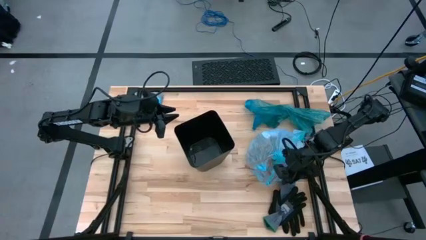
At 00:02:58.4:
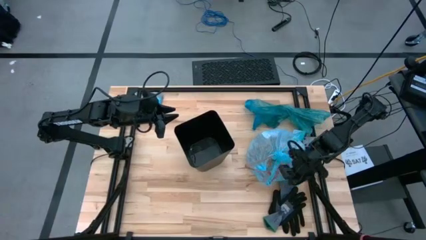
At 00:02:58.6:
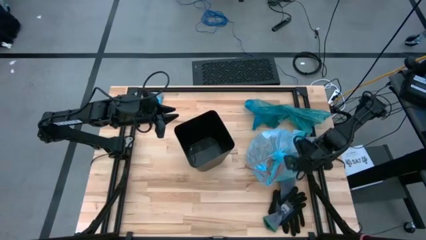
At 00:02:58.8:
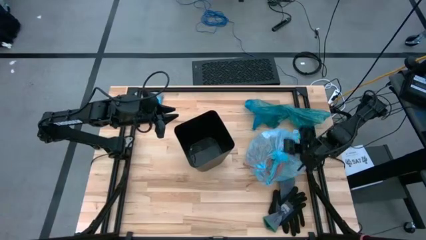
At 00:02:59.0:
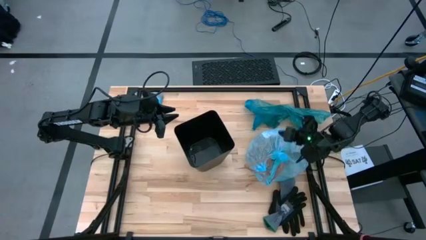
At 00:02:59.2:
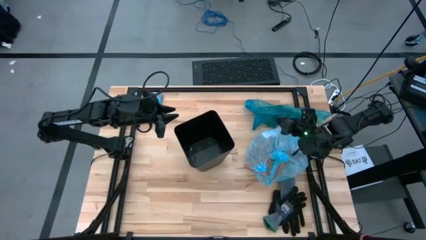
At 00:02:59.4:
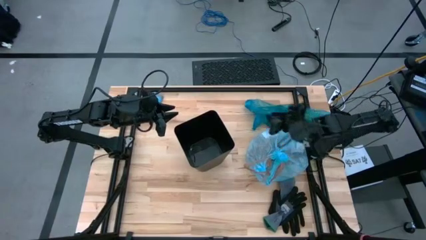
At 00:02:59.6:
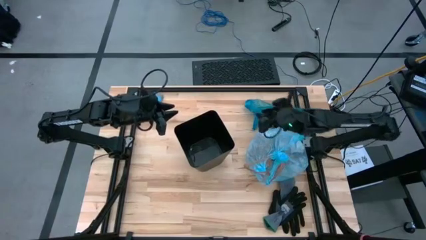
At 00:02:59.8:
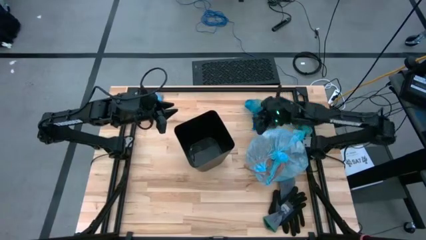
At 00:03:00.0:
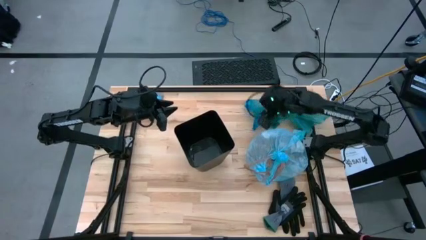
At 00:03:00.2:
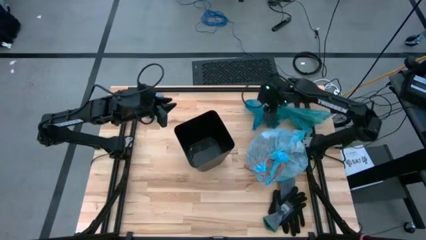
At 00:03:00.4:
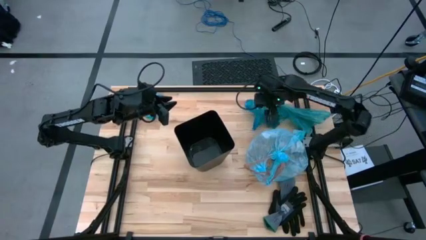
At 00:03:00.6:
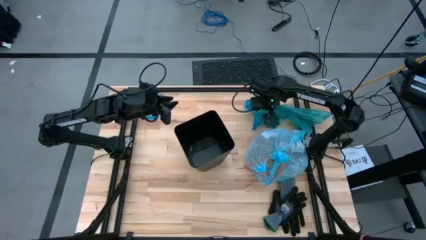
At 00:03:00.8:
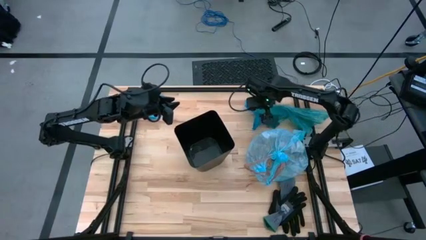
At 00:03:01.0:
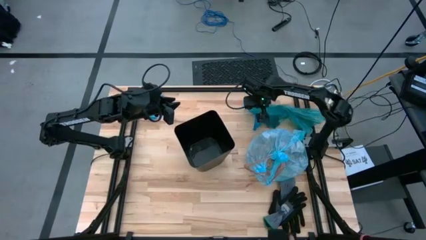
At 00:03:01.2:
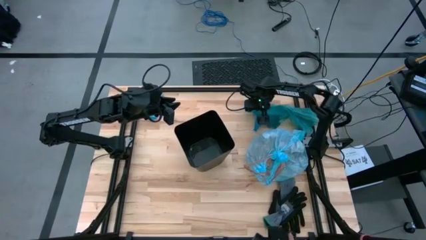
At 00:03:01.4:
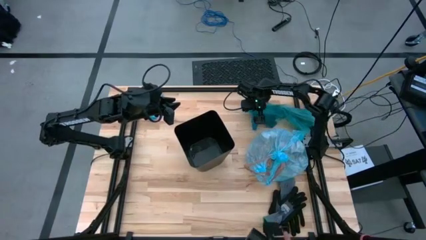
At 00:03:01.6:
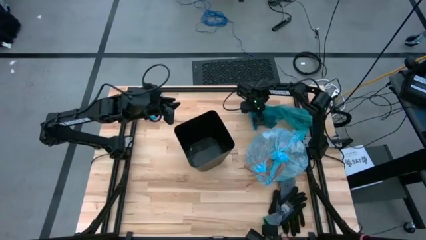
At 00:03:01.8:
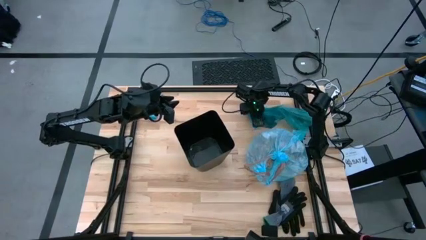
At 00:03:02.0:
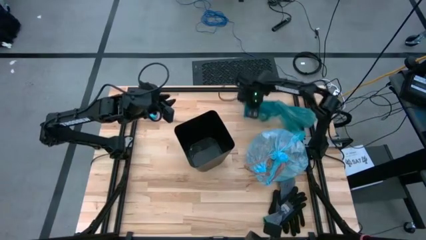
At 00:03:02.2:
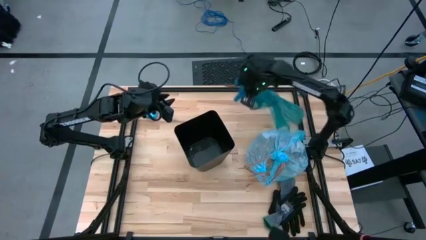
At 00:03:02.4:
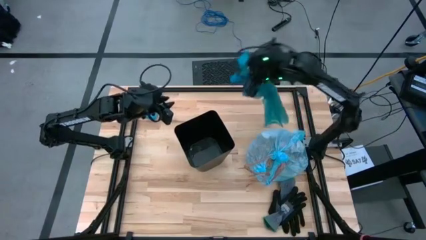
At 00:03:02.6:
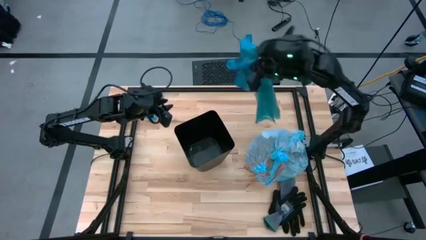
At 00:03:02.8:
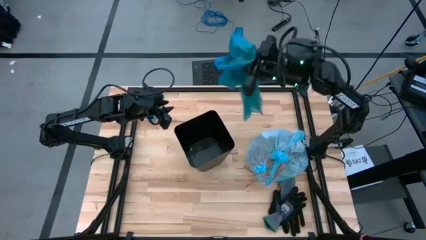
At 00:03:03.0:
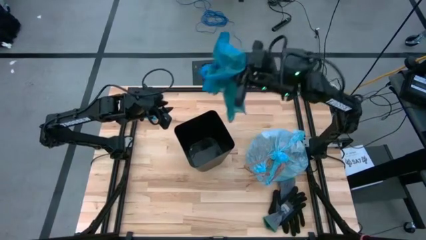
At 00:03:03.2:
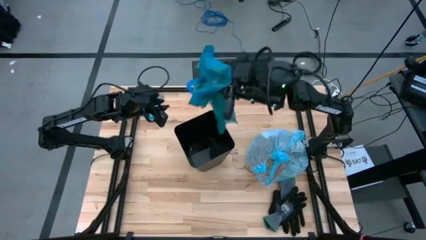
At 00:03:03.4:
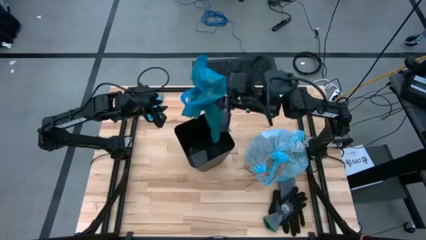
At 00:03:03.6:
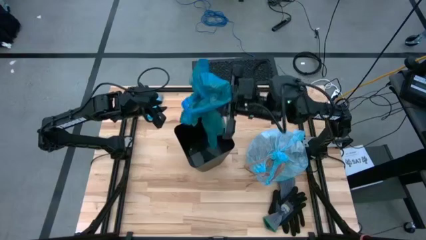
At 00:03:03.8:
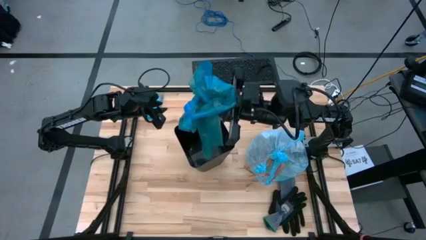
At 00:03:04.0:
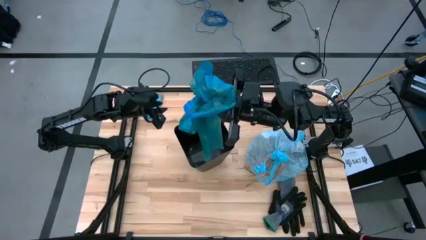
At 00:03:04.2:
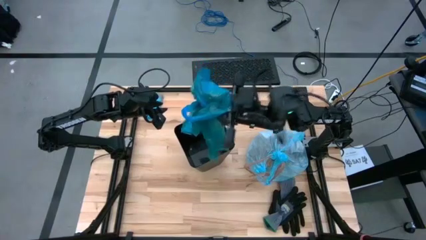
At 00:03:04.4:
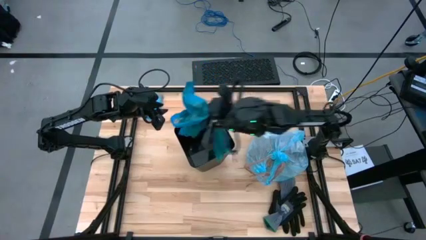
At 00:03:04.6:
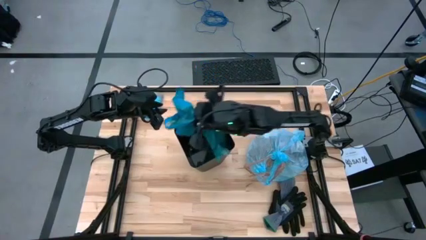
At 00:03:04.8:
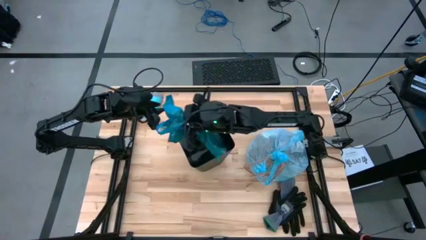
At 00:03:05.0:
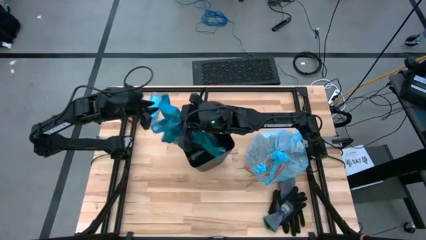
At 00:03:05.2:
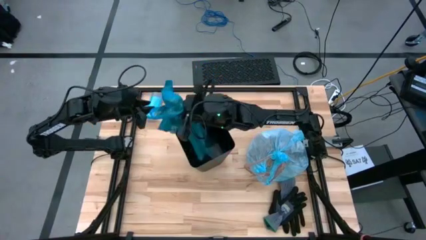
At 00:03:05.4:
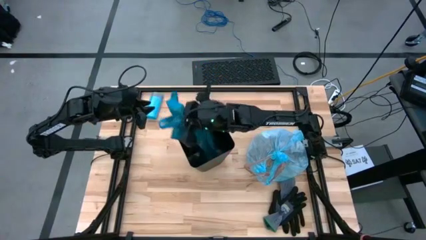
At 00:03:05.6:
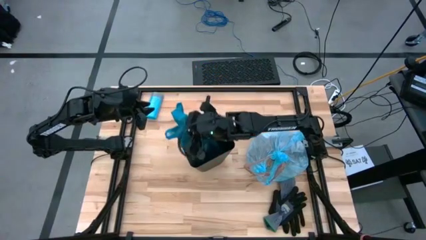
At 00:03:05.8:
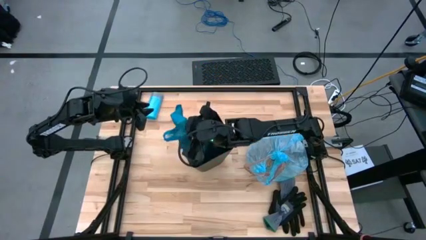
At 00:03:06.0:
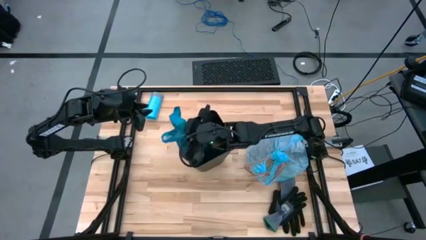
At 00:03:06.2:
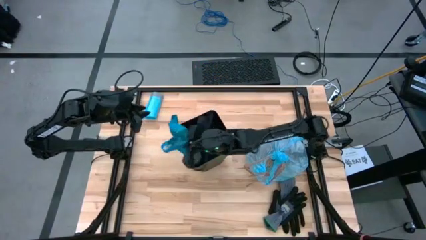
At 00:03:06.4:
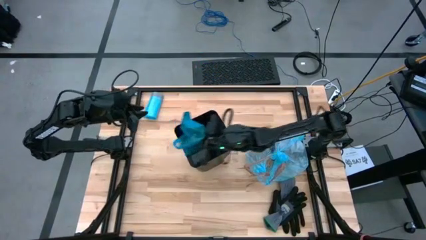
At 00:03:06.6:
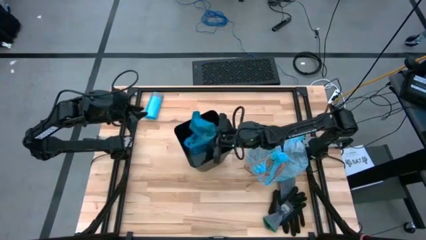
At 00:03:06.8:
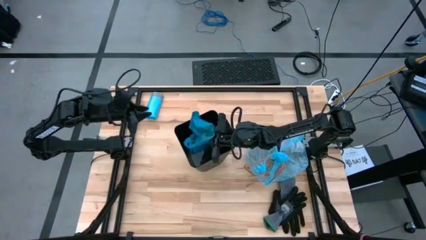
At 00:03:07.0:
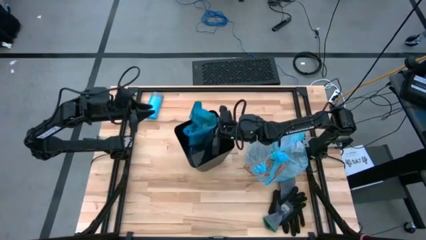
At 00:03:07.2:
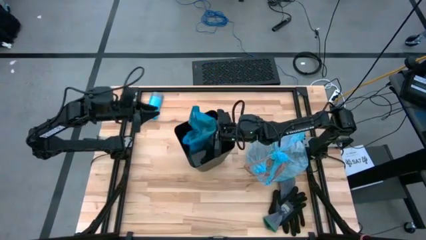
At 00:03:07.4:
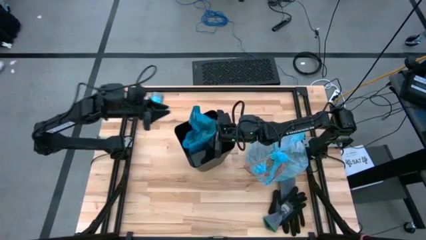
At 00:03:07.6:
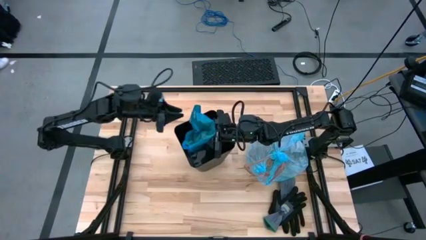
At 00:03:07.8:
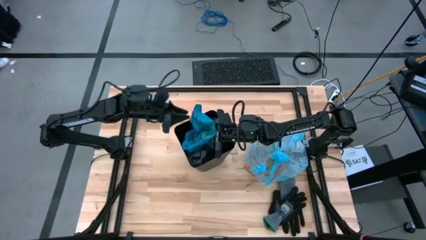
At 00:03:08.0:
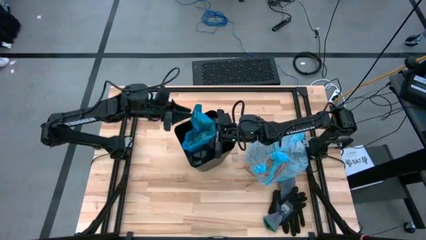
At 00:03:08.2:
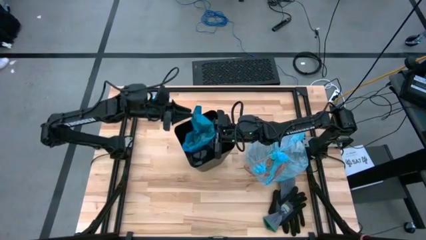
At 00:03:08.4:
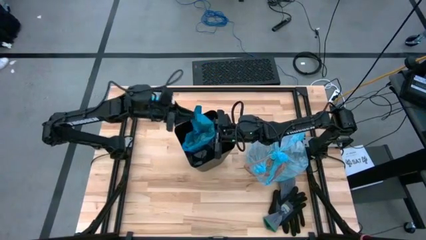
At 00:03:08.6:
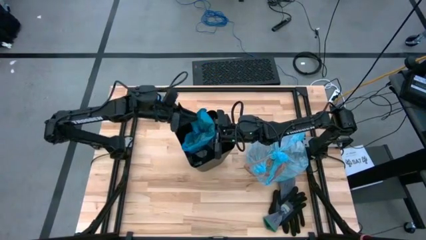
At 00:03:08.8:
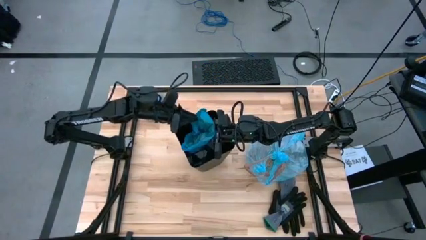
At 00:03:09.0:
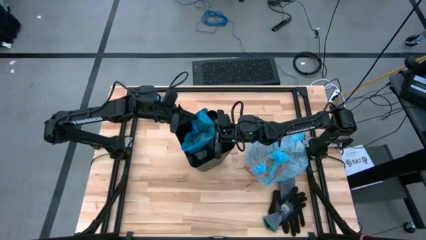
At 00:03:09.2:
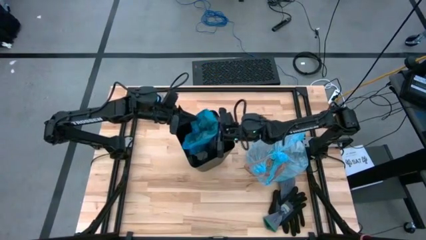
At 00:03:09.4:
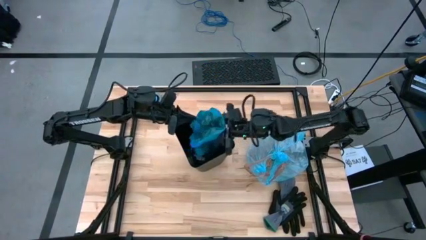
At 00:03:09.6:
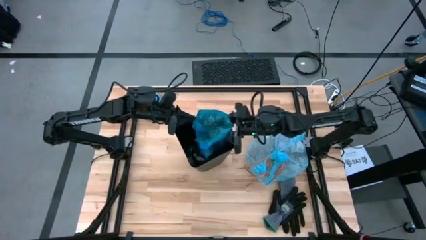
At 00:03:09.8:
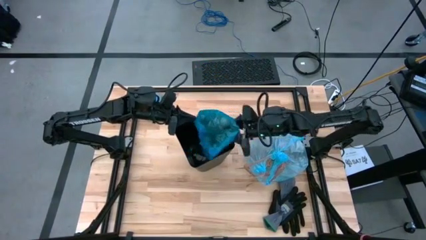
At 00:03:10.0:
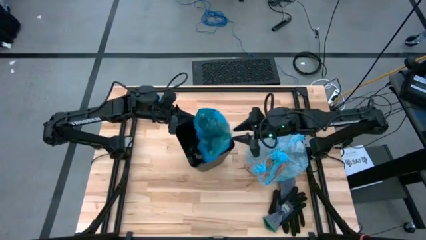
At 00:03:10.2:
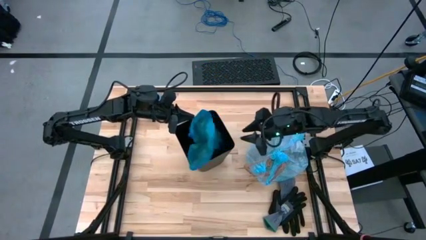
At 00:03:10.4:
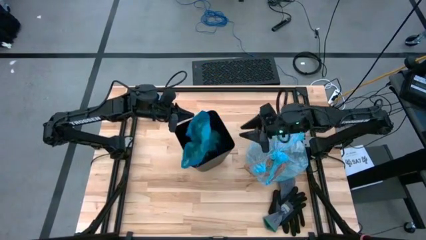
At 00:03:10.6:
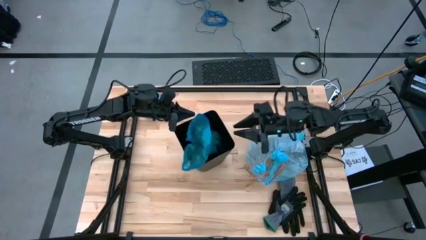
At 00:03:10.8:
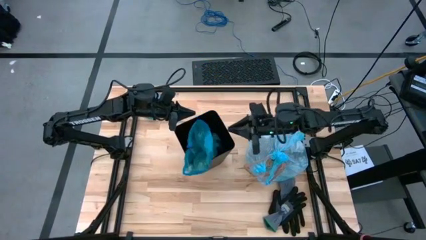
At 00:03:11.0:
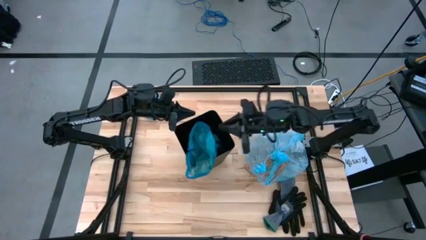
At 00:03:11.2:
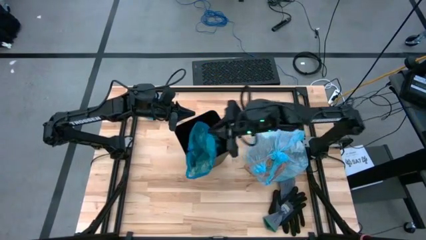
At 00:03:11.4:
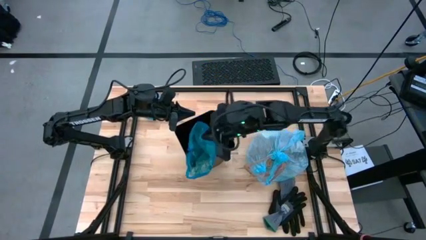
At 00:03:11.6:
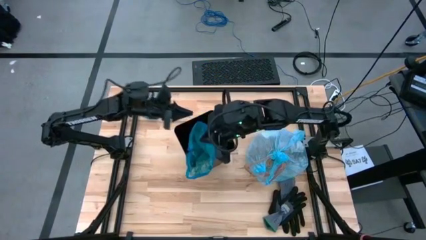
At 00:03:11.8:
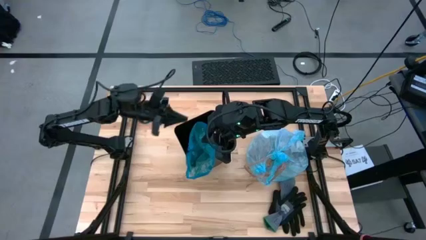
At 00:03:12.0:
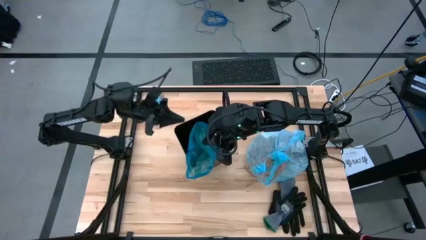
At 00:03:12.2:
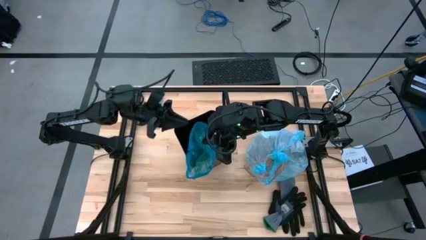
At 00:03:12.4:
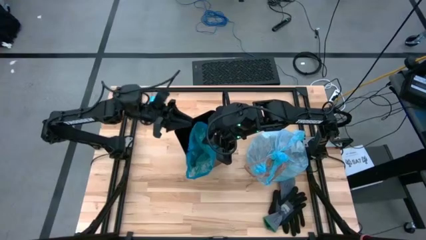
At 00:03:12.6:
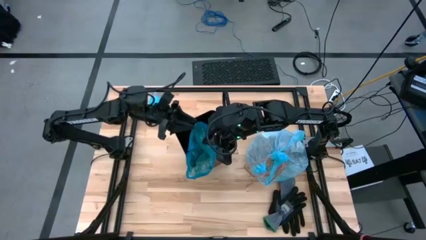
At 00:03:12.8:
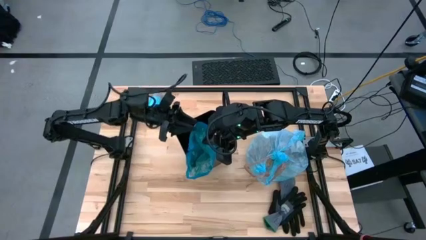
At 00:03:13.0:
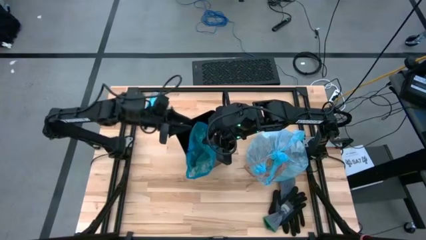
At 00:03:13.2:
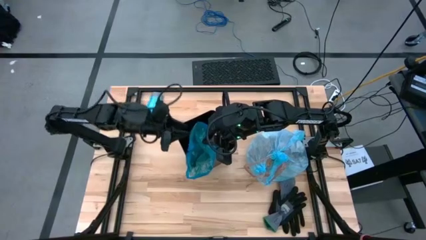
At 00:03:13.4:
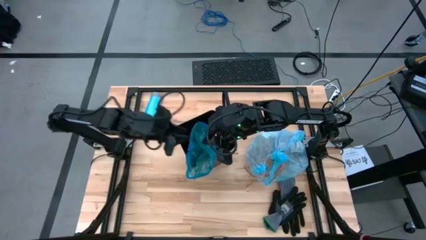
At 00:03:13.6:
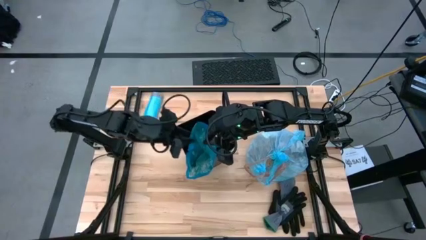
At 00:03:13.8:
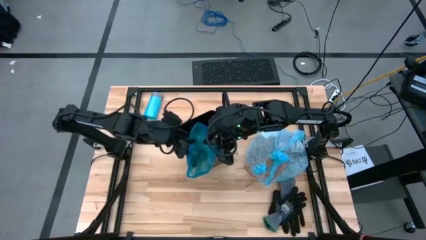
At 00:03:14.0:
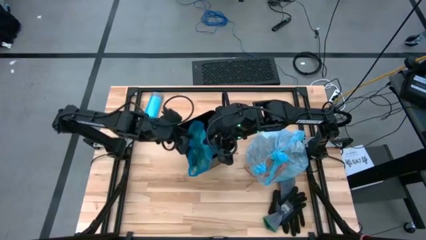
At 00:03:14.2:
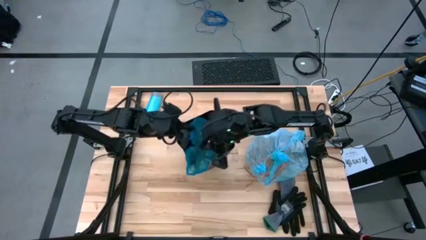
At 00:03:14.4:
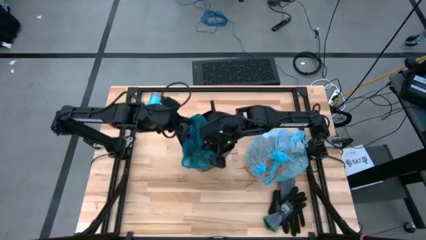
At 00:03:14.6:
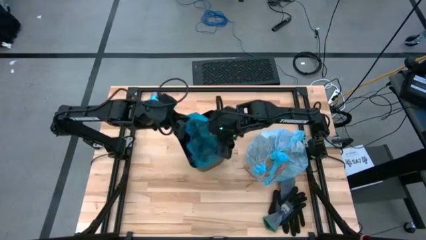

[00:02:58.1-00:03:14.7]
Task: place trash/remove bag and relplace
Insert a new blue trash bag into the trash bin
